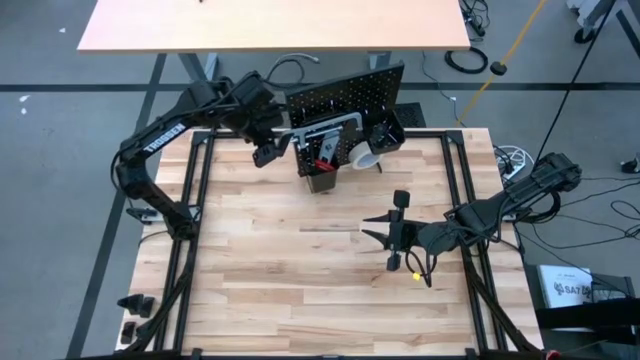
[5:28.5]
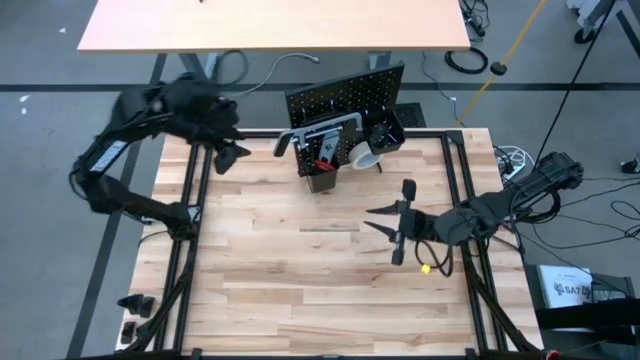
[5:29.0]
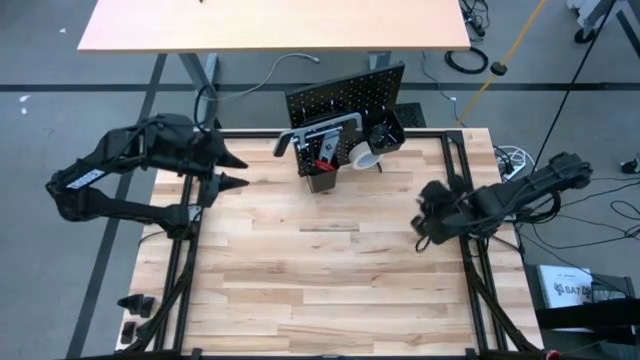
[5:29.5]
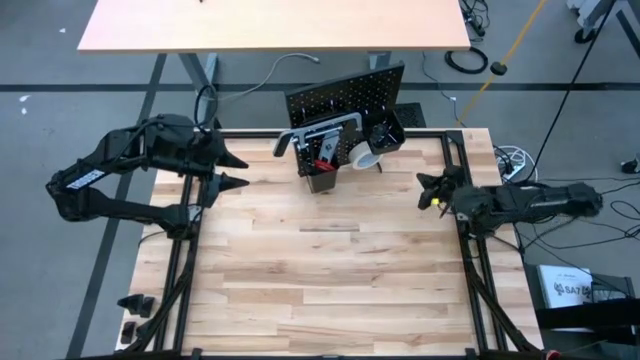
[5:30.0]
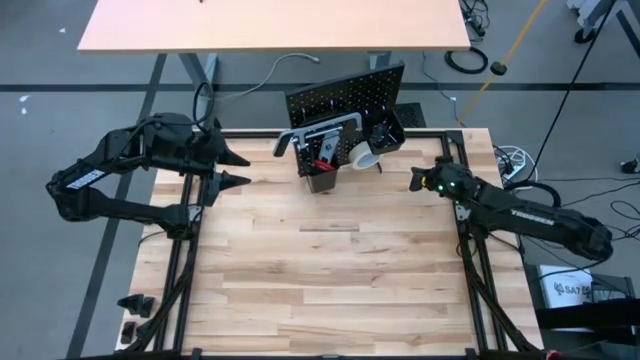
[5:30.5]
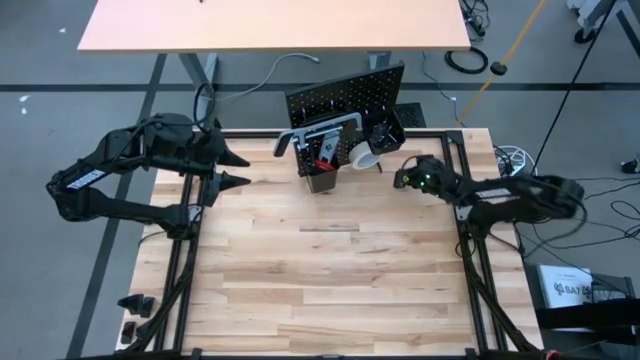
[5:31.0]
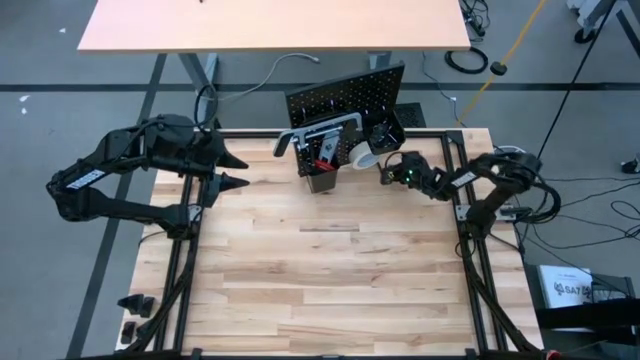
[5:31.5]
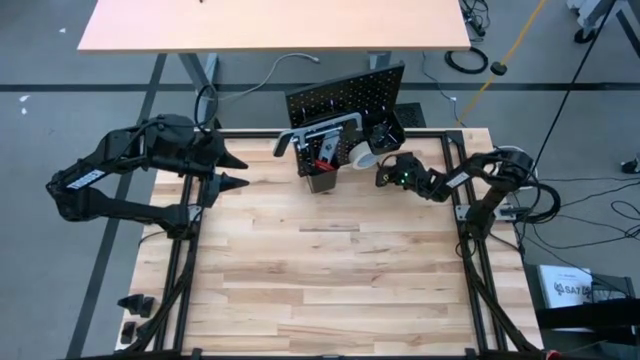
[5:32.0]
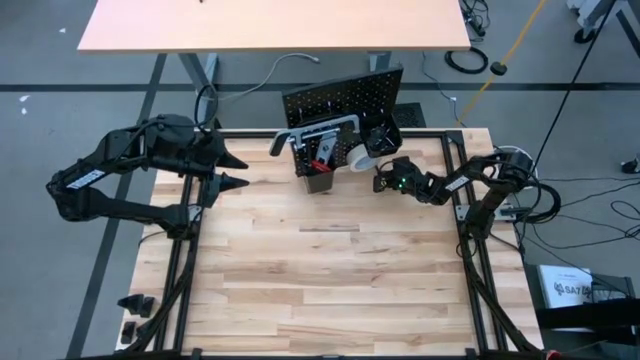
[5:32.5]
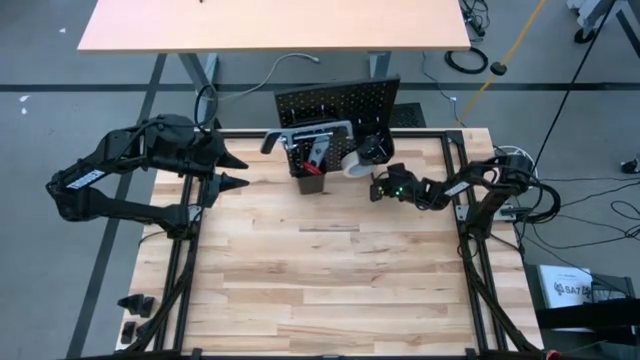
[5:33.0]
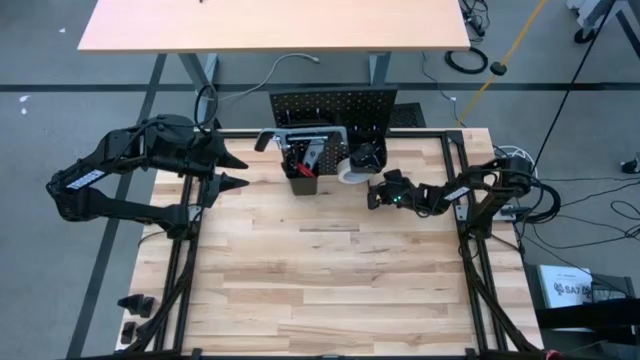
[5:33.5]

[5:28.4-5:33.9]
Task: Hang tools onto peg board
Adjust the pegboard

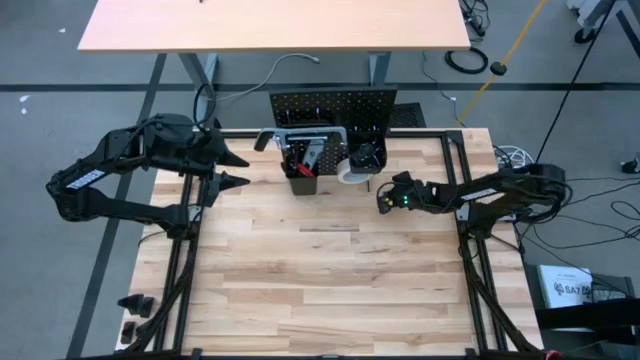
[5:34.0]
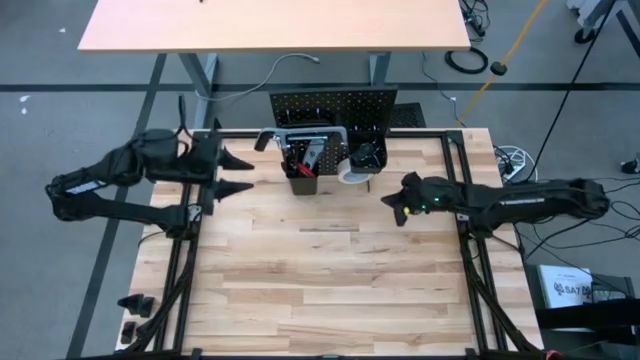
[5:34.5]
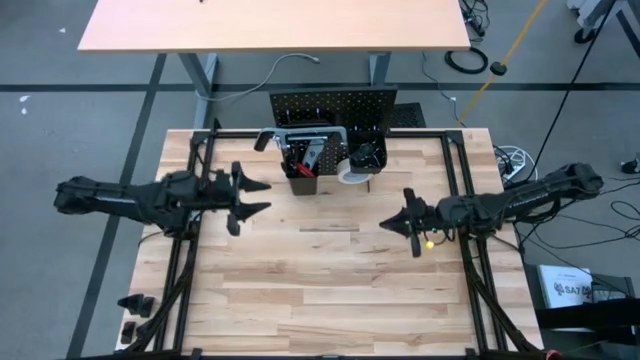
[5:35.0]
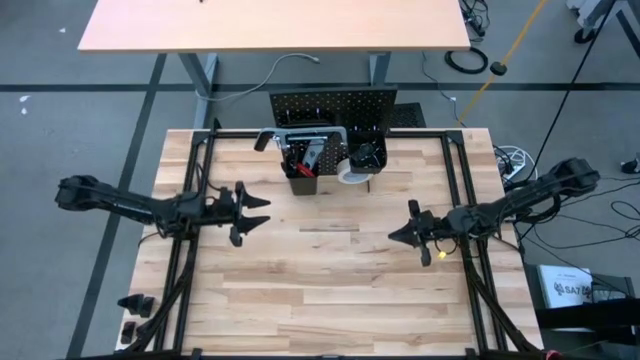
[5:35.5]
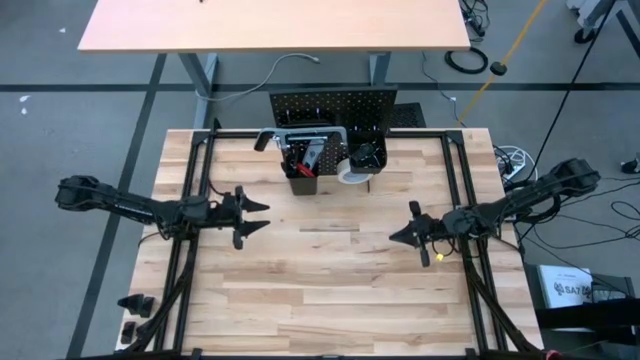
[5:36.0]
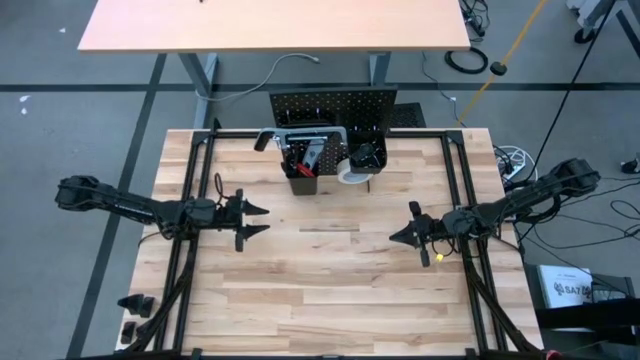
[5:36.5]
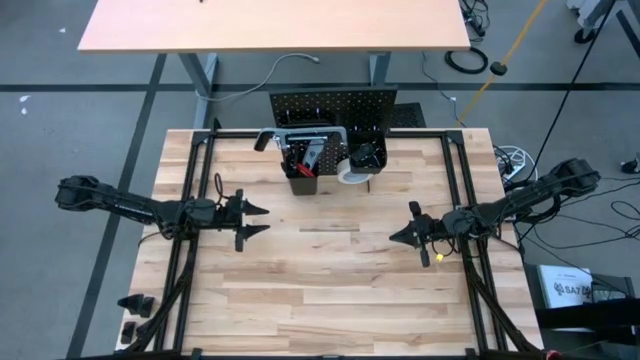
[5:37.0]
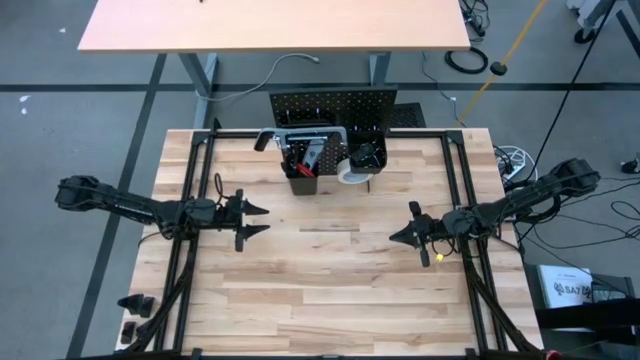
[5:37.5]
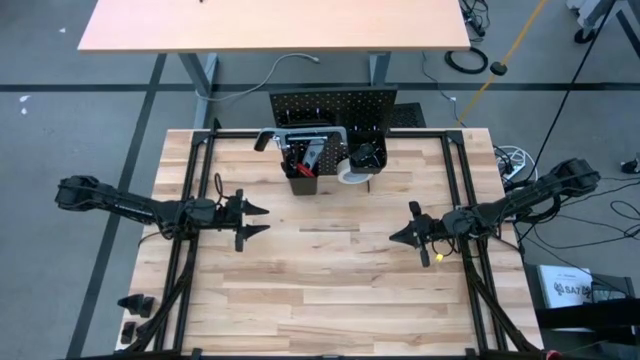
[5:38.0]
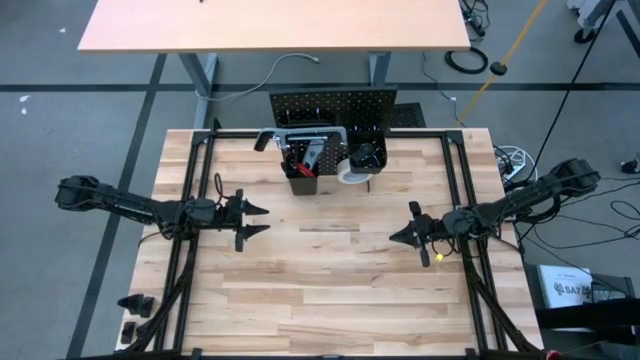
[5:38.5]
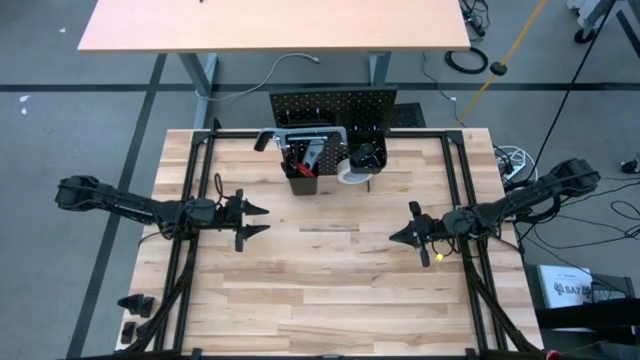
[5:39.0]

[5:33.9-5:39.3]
Return to Home Position

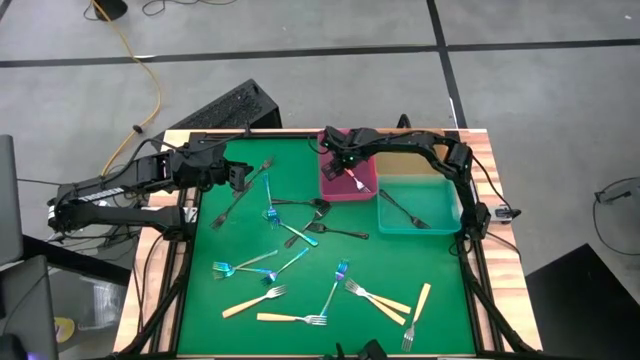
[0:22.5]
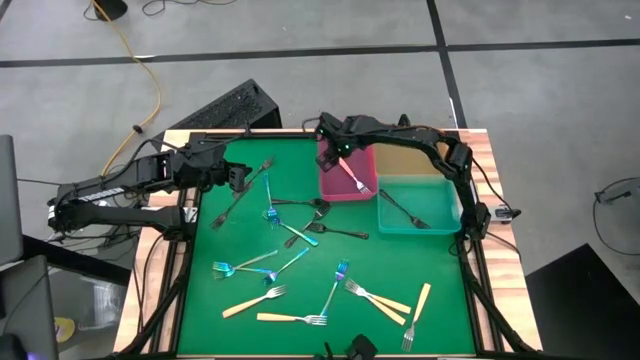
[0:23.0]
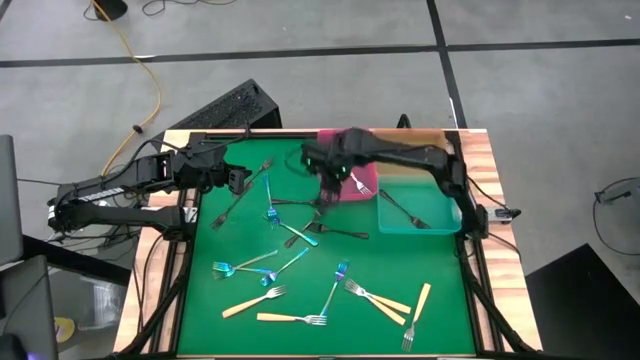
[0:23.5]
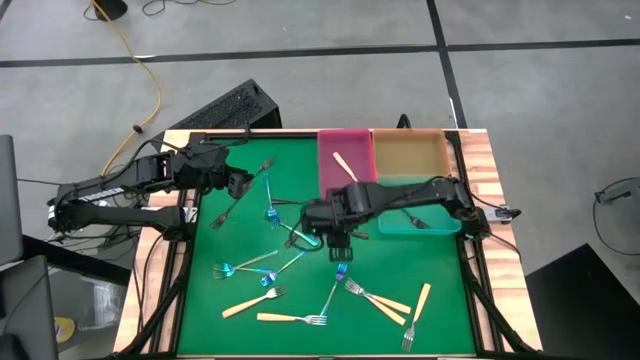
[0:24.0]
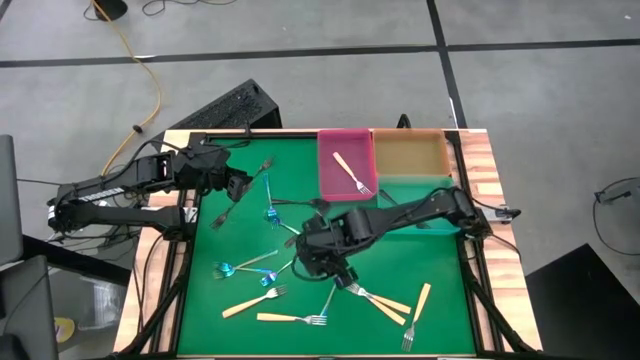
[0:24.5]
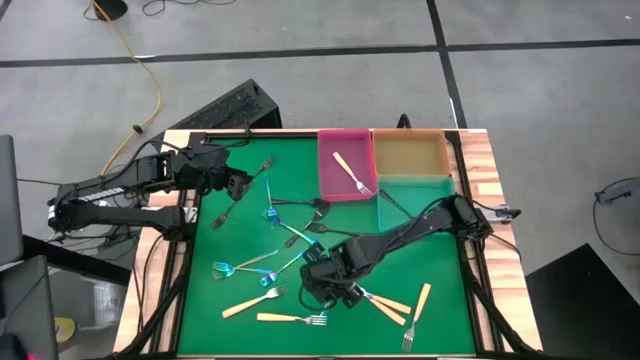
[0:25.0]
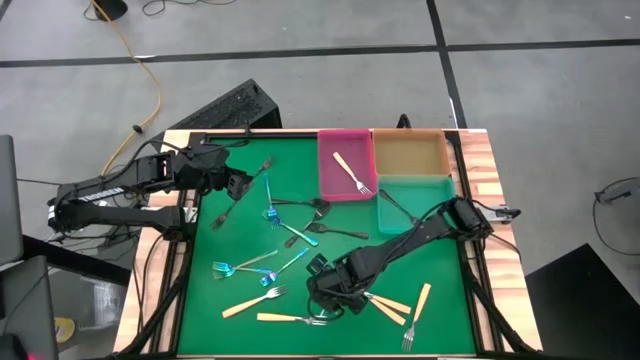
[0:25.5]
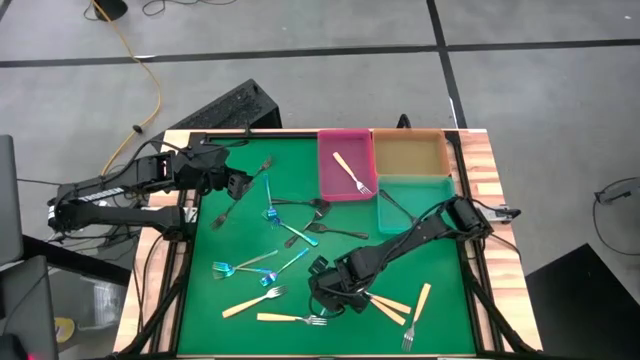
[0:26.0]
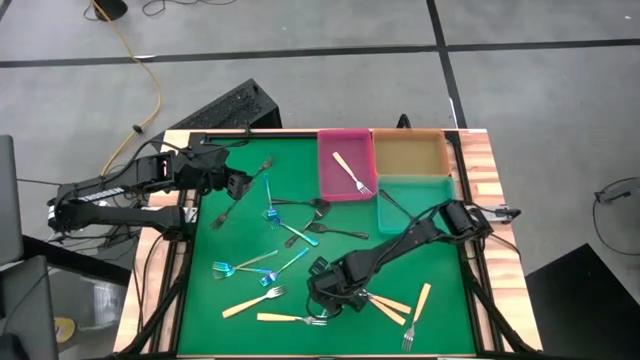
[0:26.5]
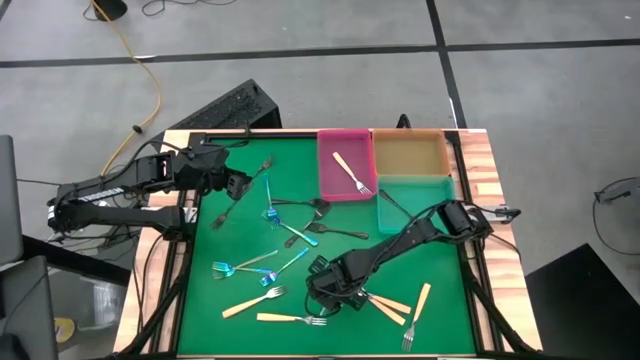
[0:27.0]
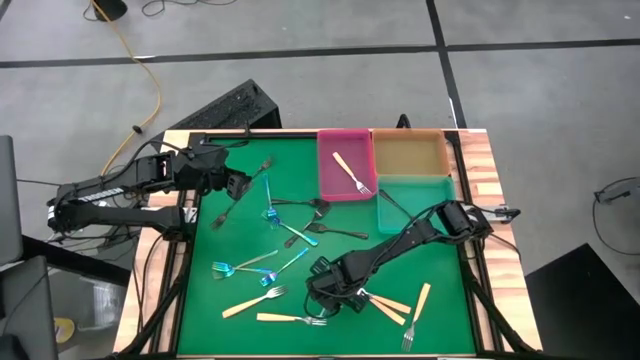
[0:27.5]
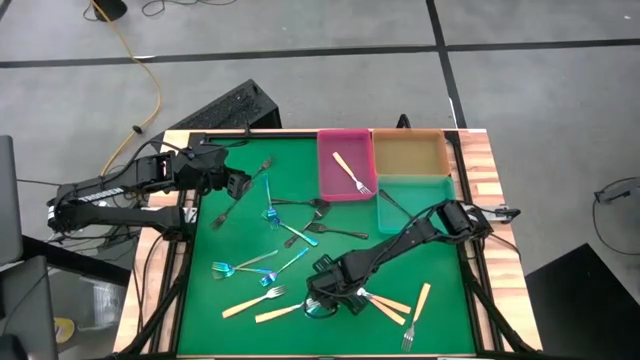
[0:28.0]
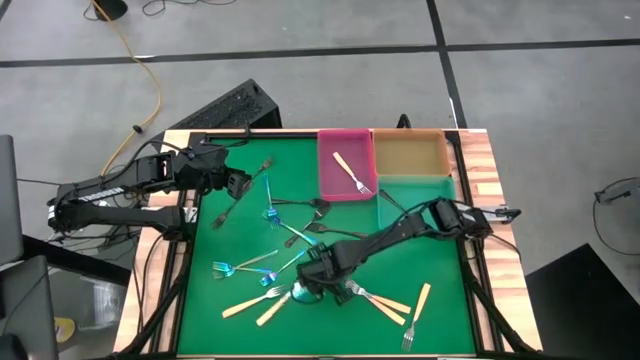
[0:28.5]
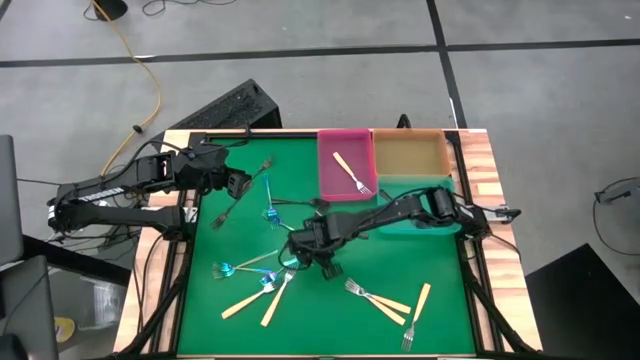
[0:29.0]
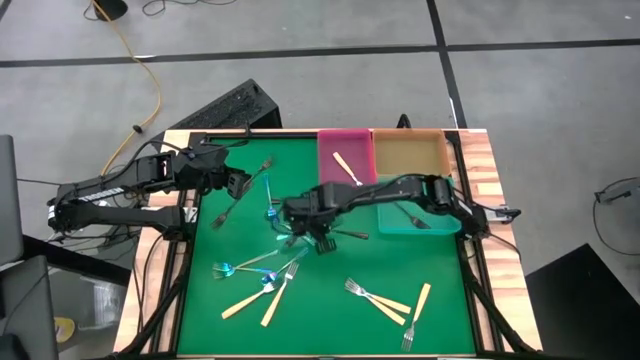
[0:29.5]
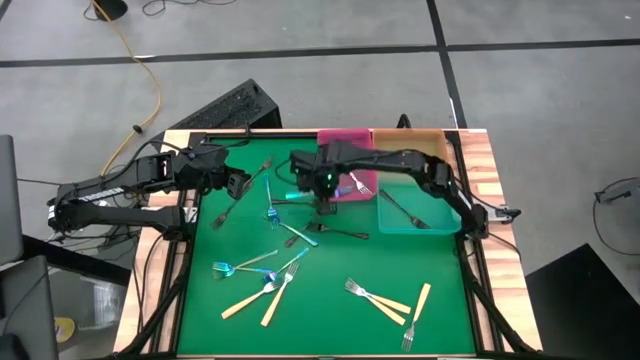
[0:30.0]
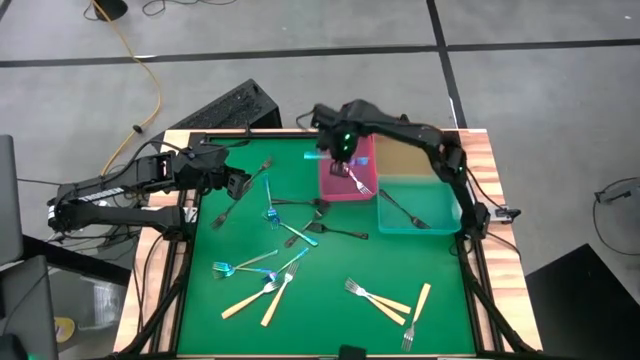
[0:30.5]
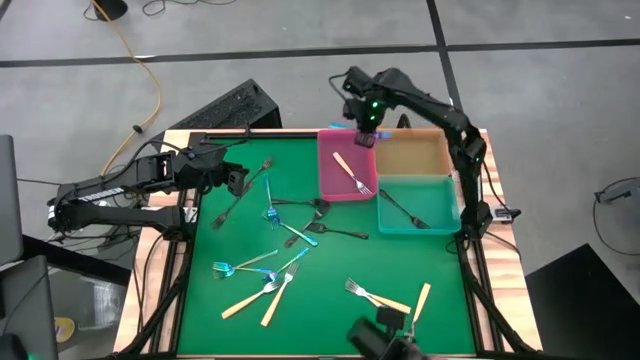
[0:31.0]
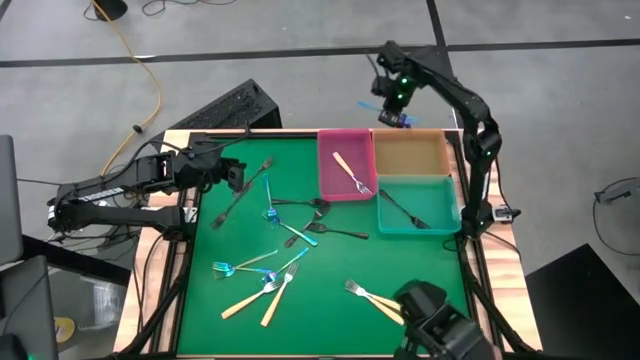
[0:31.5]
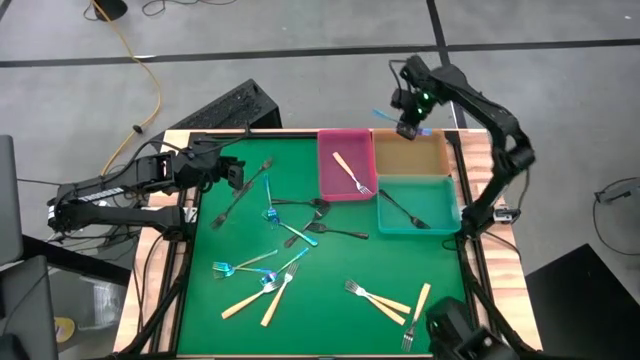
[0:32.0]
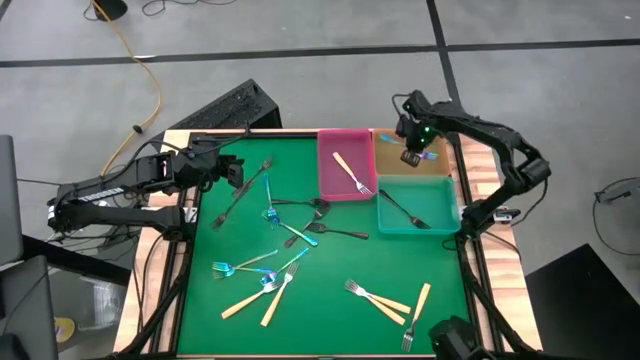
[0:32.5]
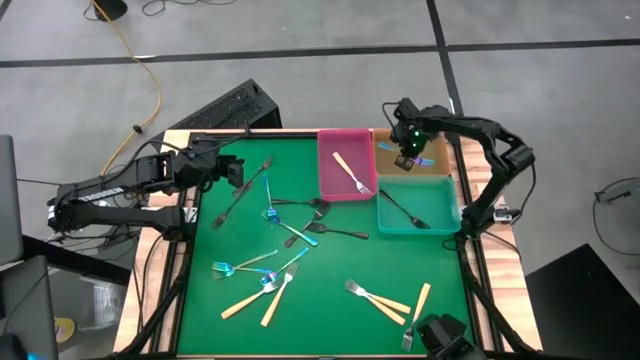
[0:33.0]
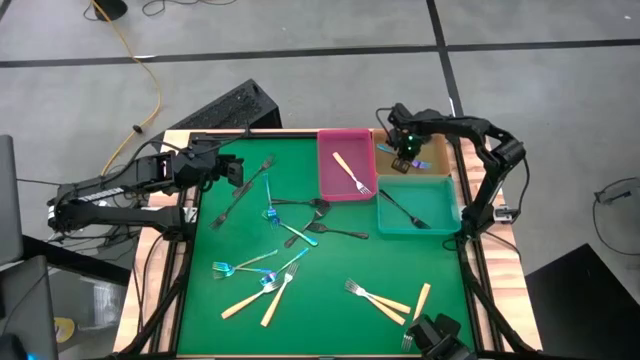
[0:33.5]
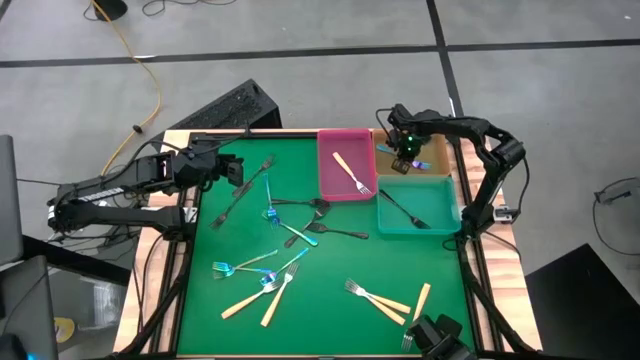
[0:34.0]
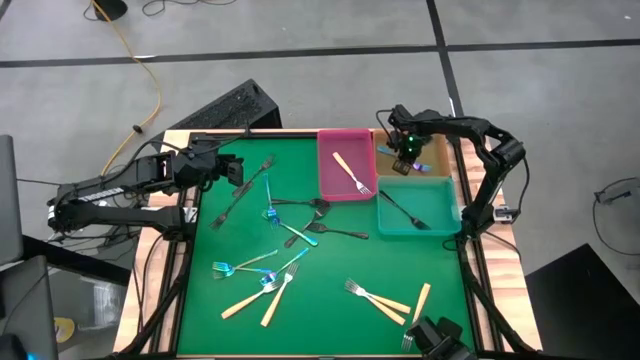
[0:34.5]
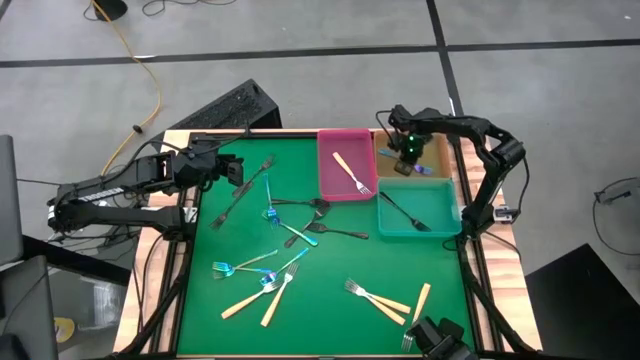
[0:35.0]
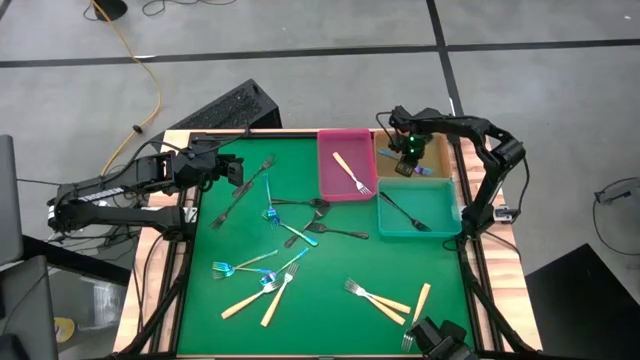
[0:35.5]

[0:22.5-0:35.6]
Task: Sort silverware by color (type)
Put the blue fork into the orange bin
